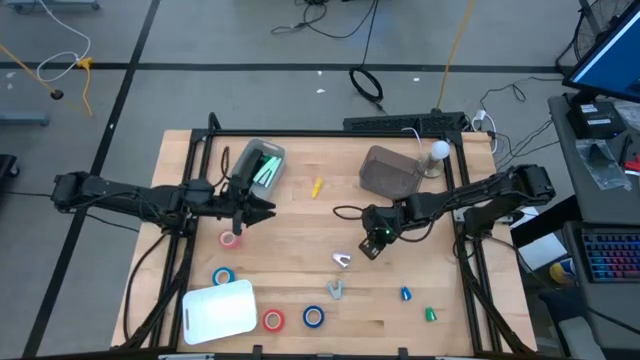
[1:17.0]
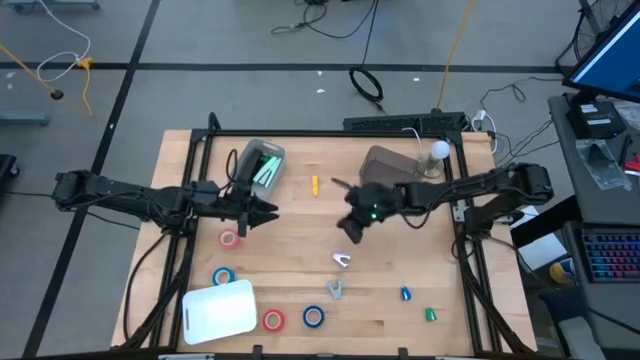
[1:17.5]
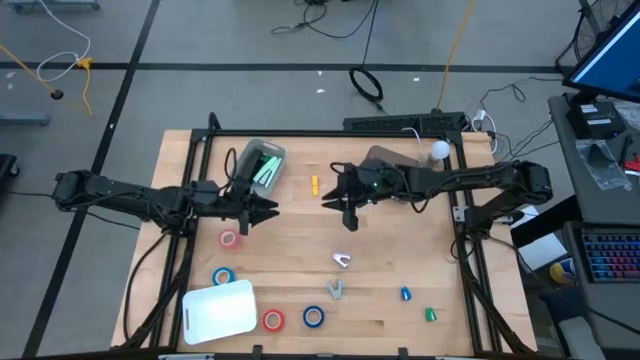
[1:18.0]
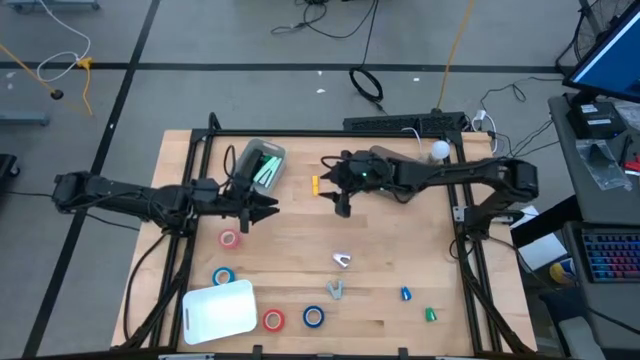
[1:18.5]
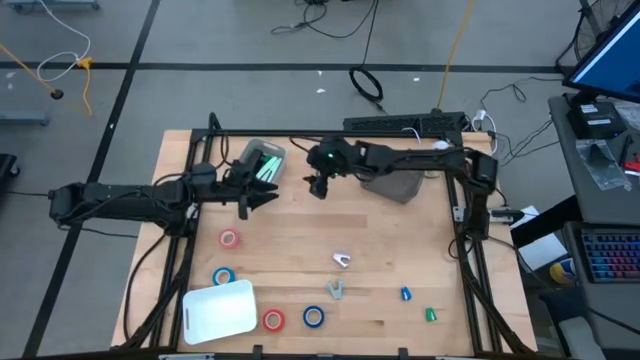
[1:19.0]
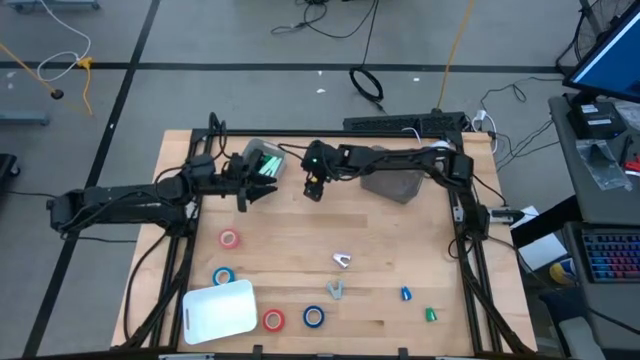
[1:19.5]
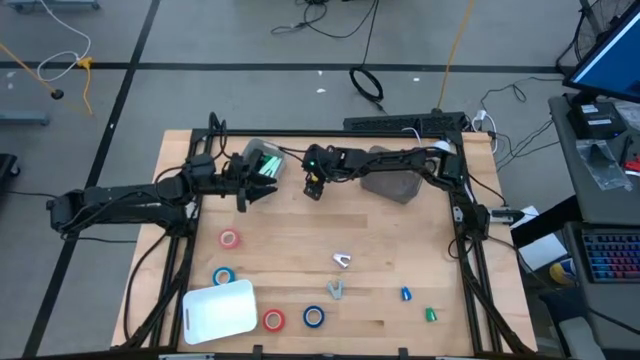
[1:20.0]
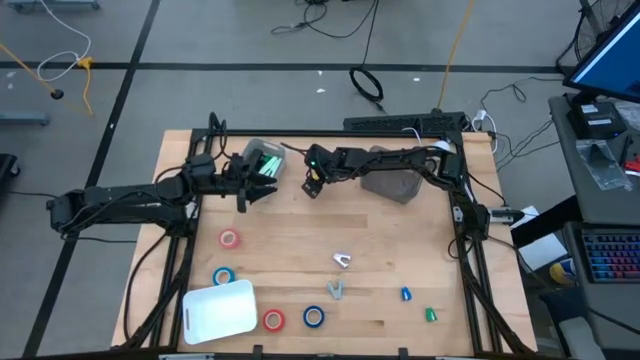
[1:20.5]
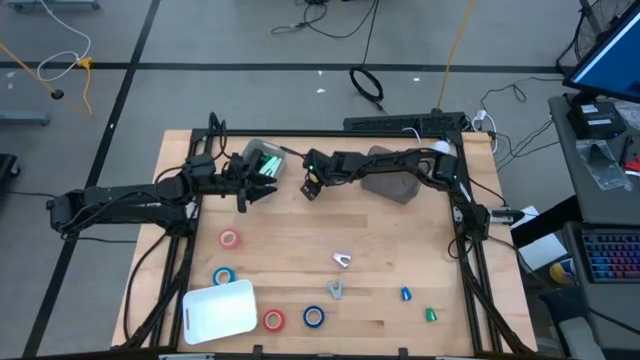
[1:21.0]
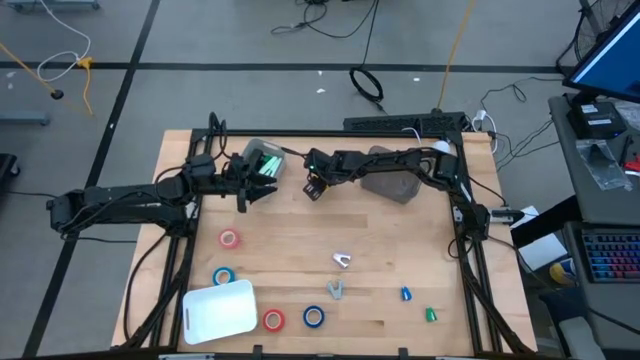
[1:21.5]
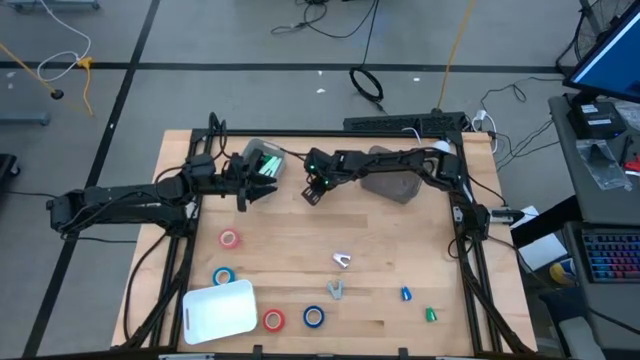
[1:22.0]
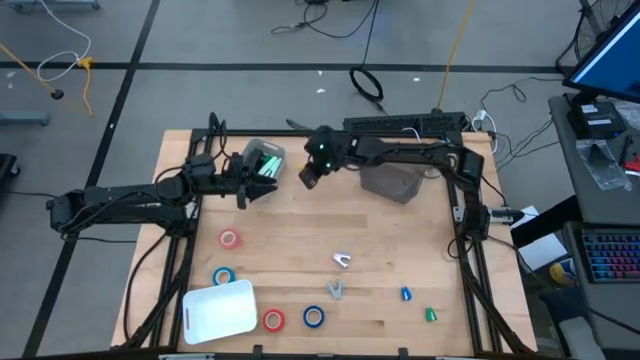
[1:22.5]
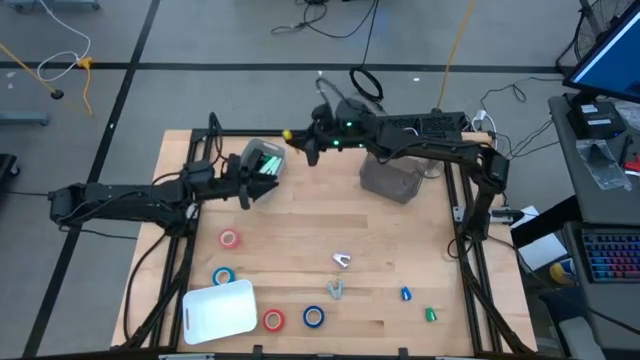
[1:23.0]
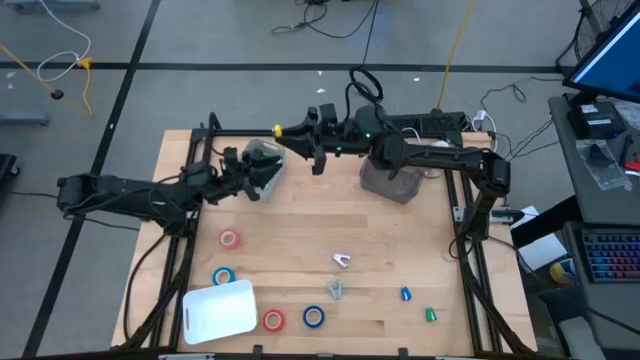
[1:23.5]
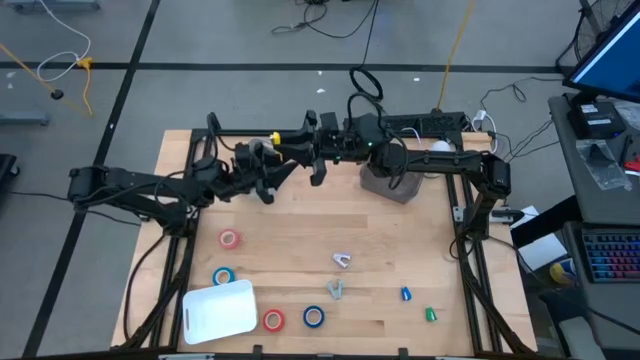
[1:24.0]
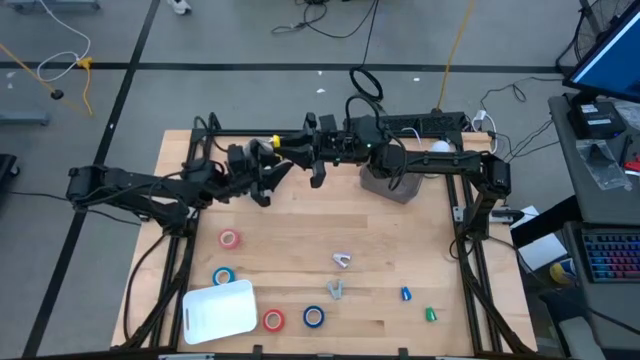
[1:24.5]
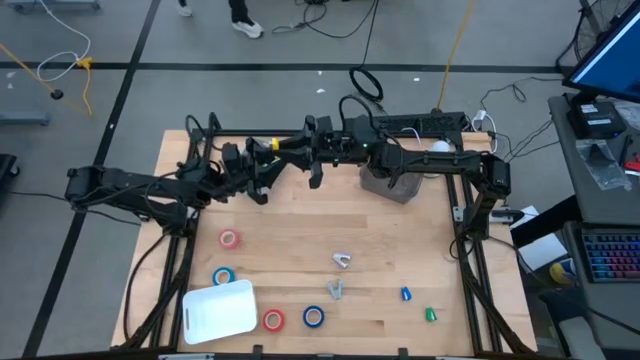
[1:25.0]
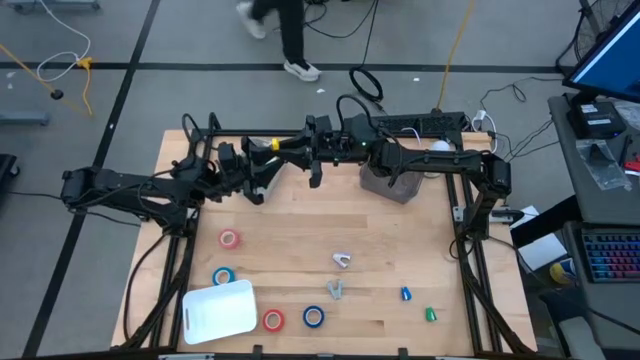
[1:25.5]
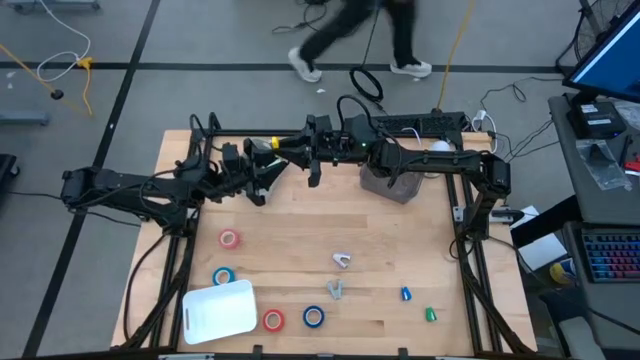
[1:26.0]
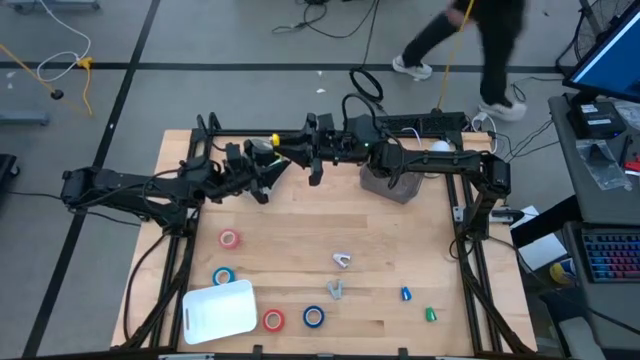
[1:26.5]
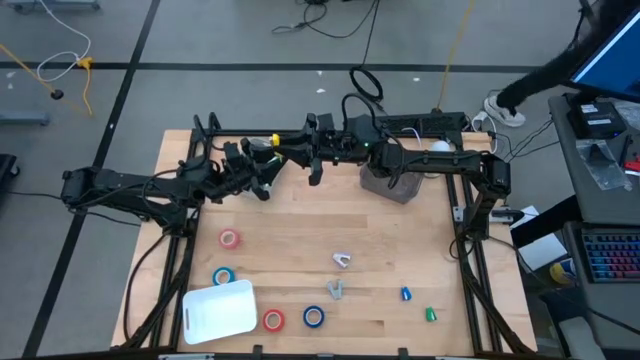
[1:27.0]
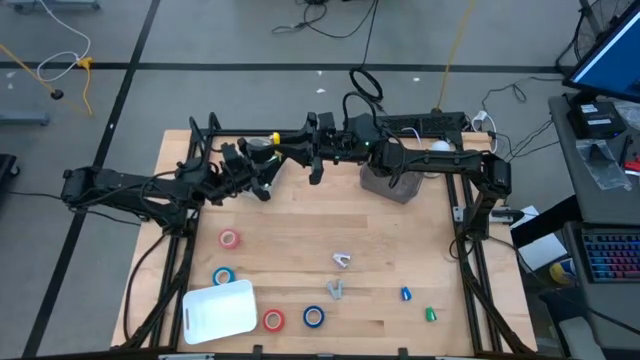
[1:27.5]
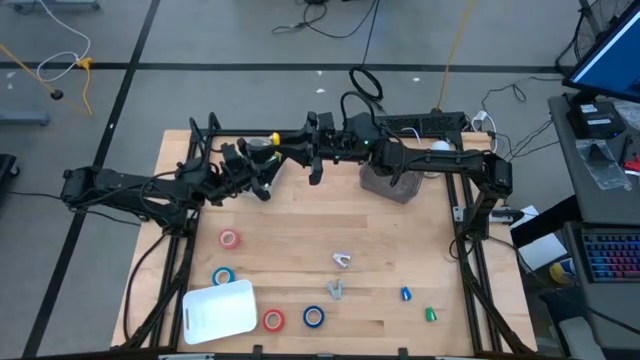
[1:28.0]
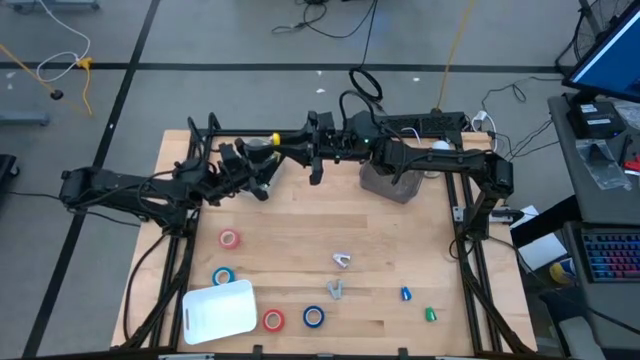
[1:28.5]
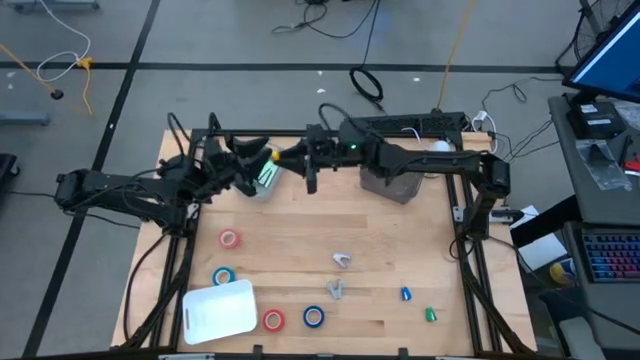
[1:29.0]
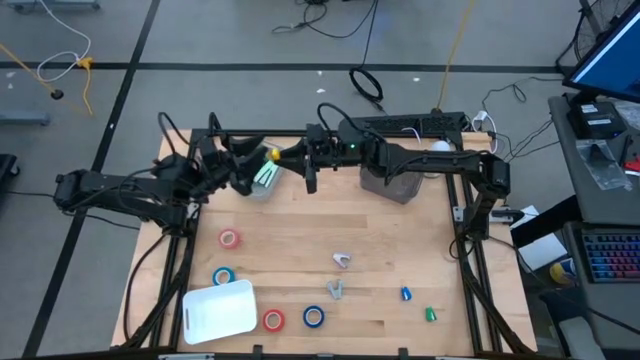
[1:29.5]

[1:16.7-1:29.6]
Task: Pick and place Stapler, Stapler remover, tape
Put the yellow stapler into the gray bin

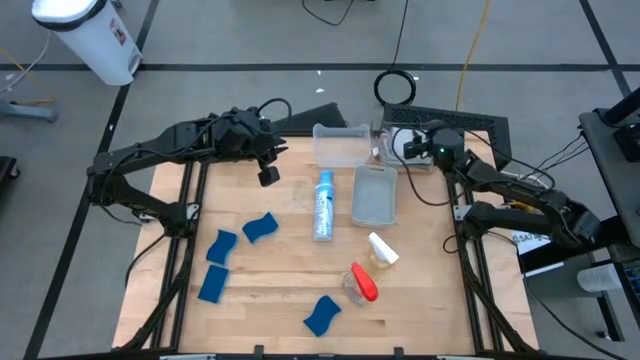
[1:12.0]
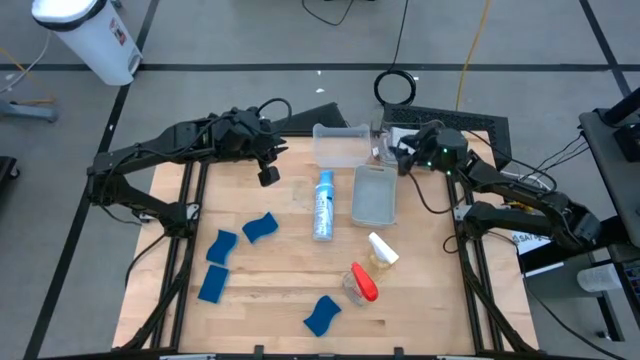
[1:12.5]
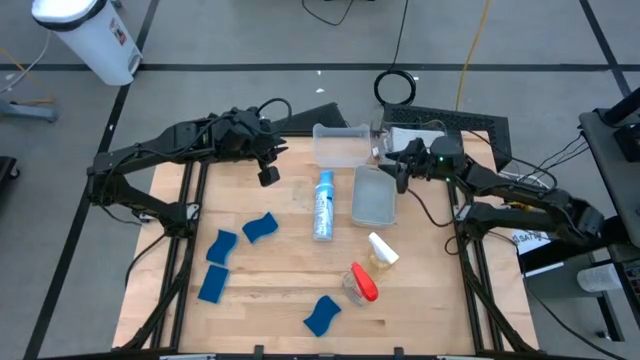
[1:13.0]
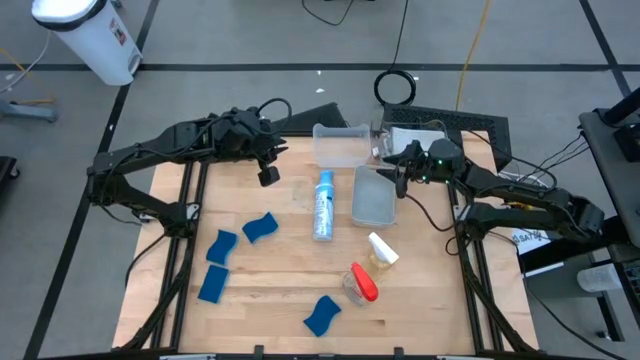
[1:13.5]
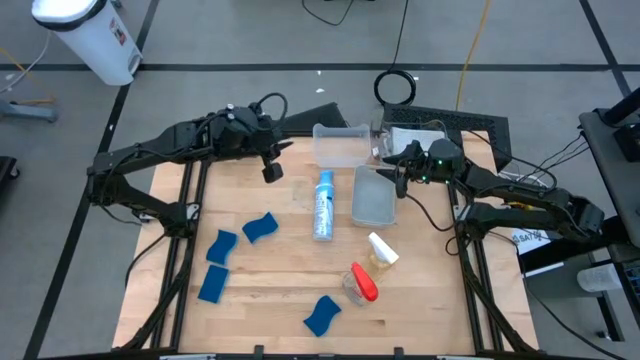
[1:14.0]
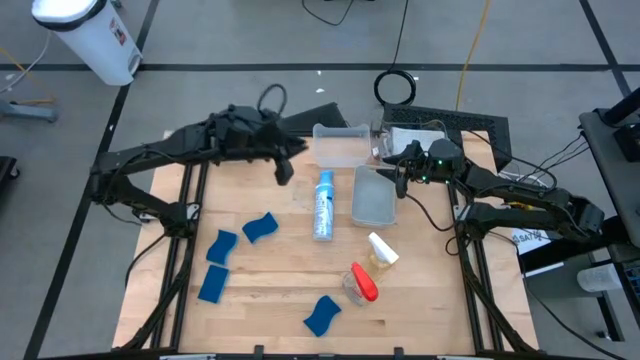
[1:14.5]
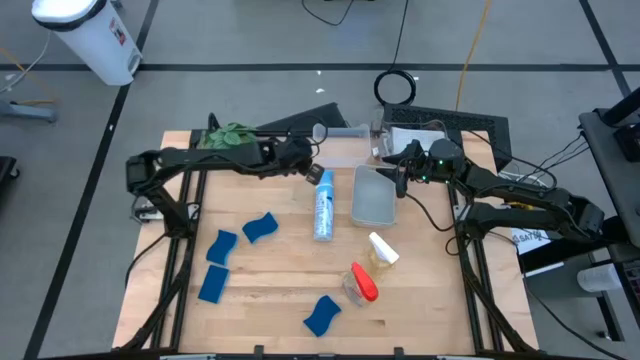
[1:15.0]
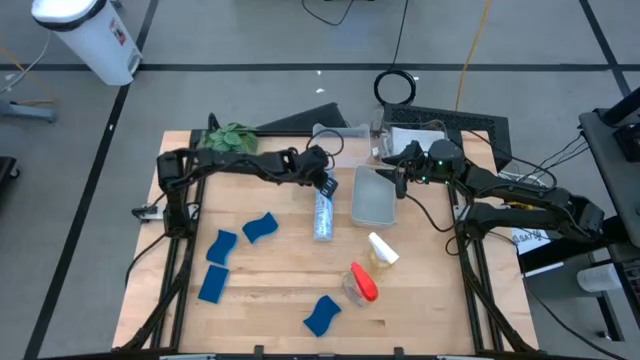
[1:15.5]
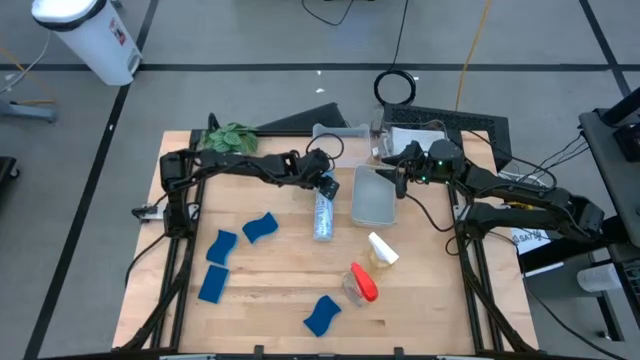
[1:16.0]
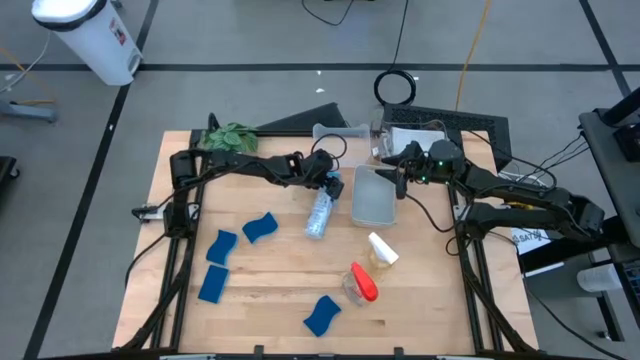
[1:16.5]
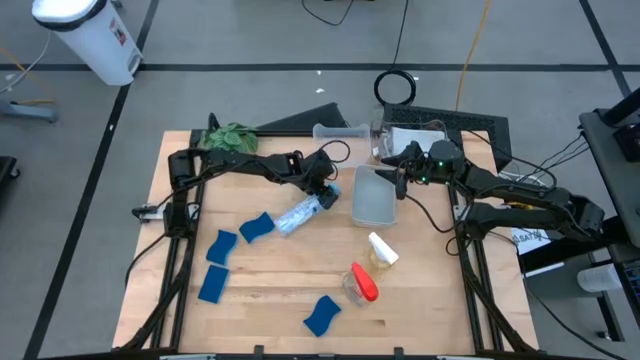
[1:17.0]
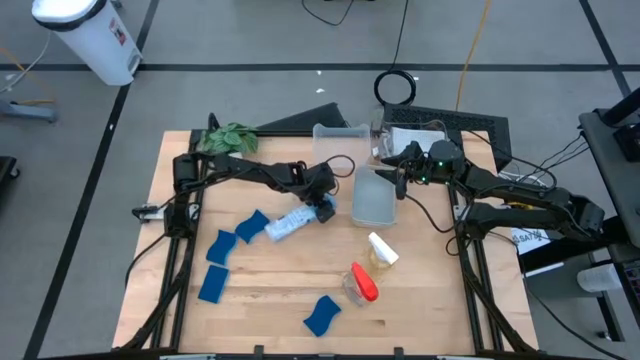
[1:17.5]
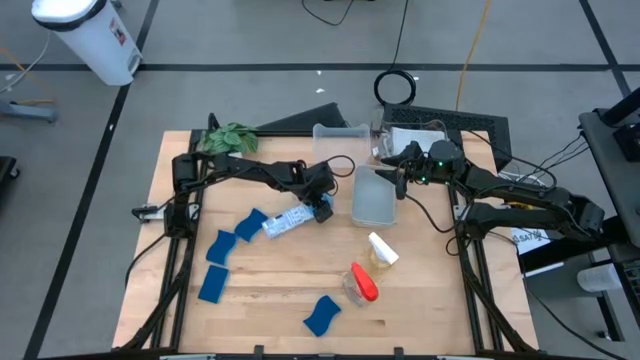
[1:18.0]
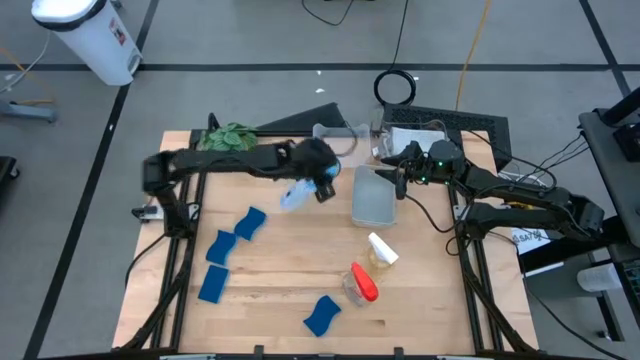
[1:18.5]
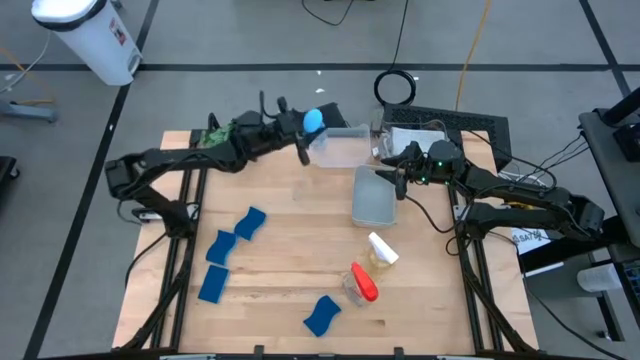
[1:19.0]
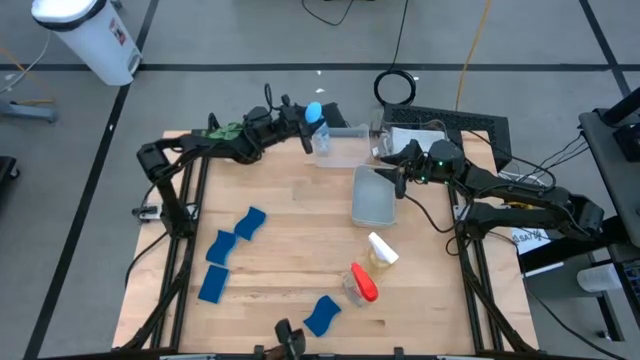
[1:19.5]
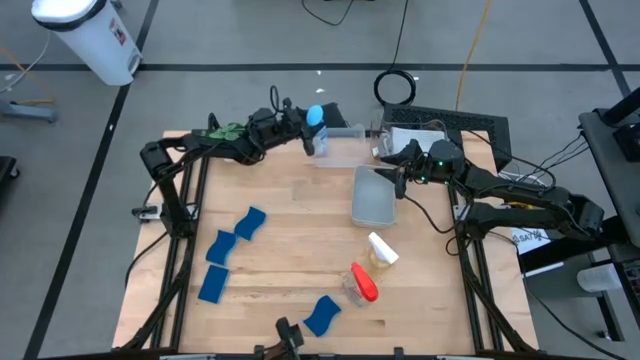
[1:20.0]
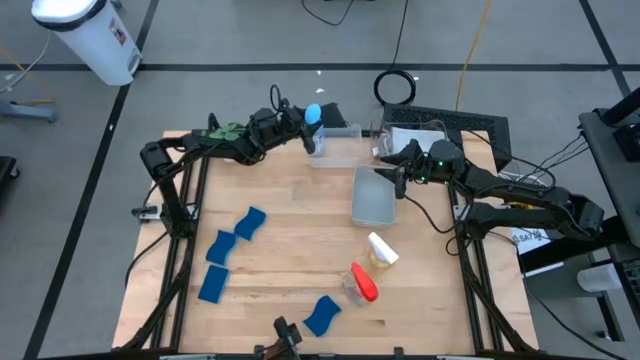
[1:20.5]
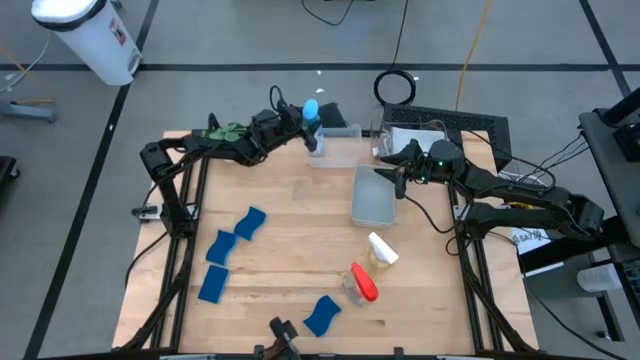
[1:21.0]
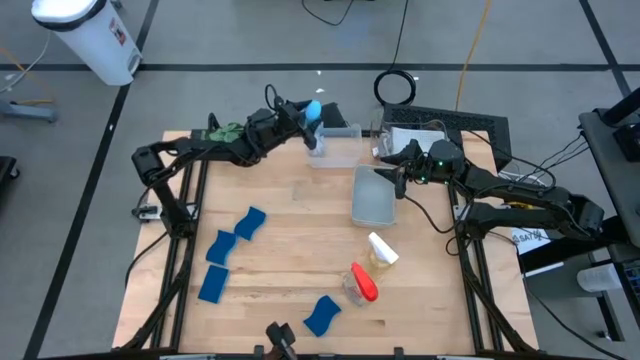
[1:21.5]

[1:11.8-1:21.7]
Task: Pick & Place Kitchen Items
Put the blue spray bottle into the white bin
